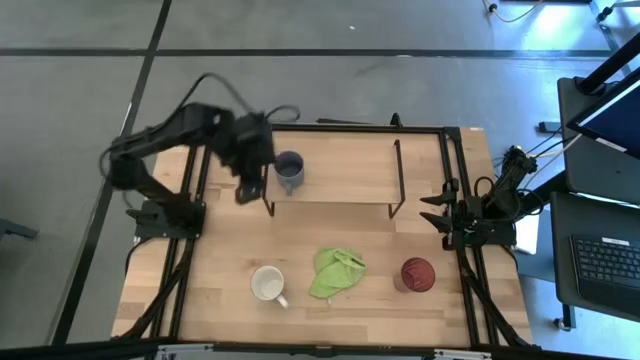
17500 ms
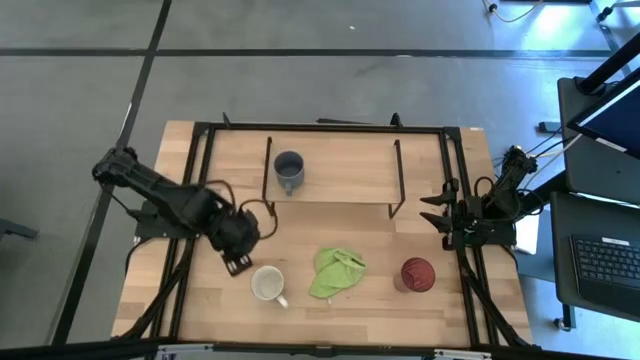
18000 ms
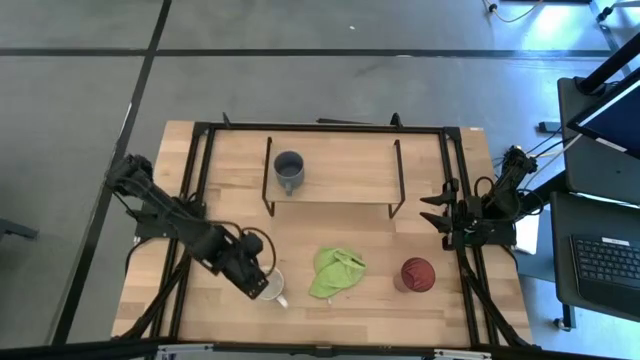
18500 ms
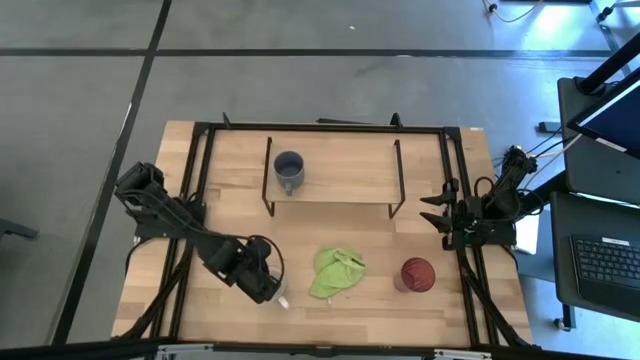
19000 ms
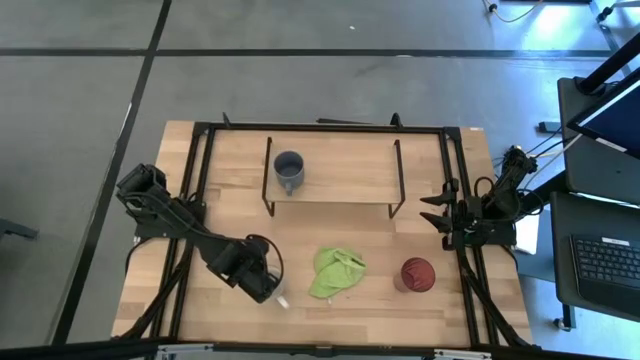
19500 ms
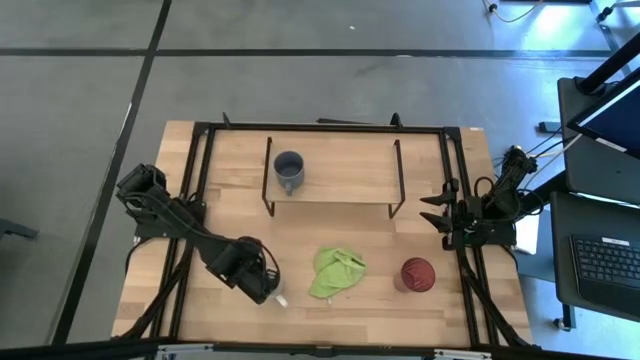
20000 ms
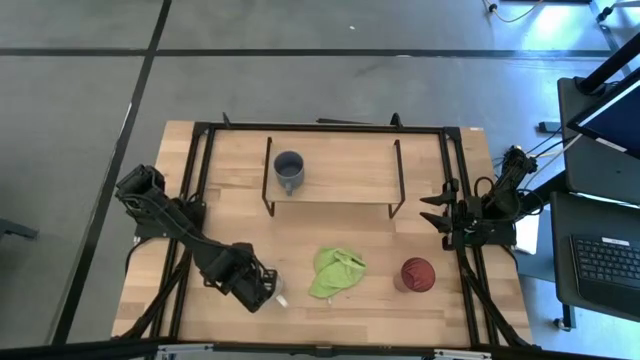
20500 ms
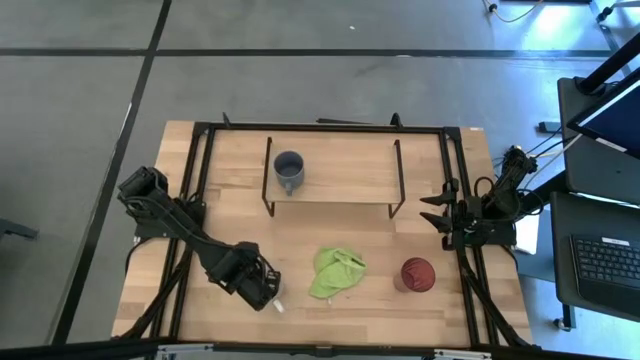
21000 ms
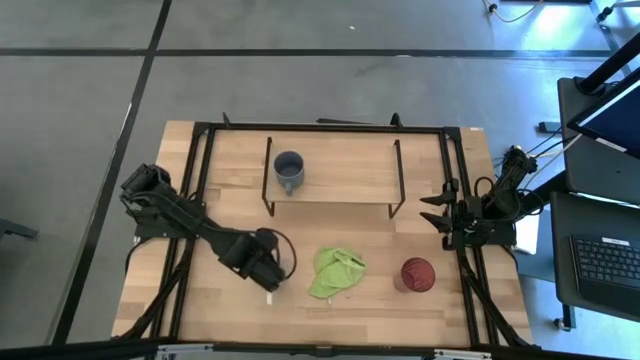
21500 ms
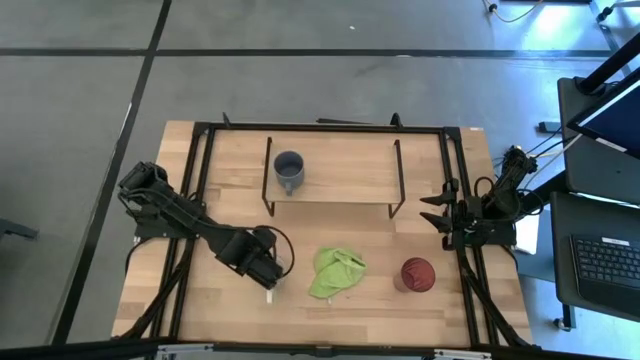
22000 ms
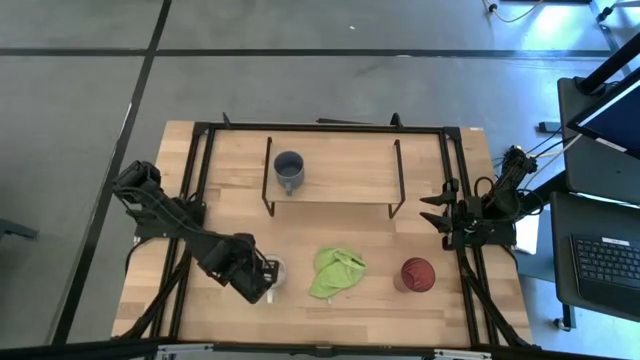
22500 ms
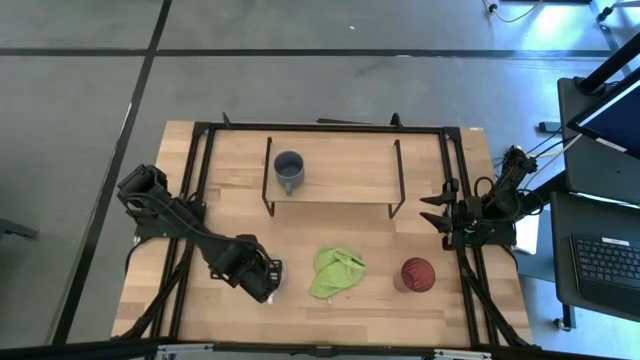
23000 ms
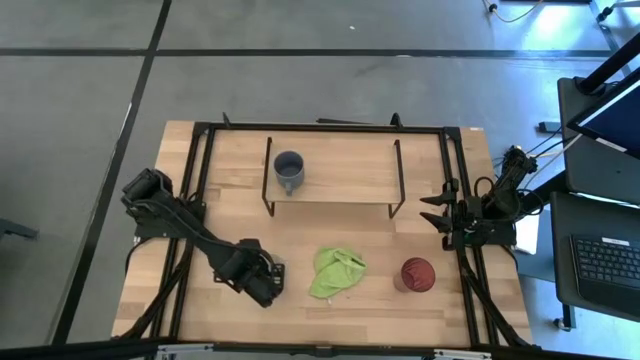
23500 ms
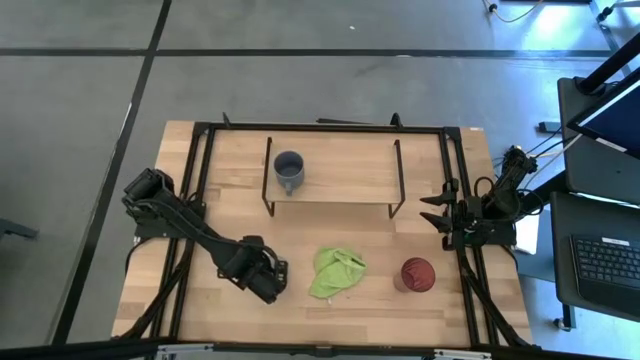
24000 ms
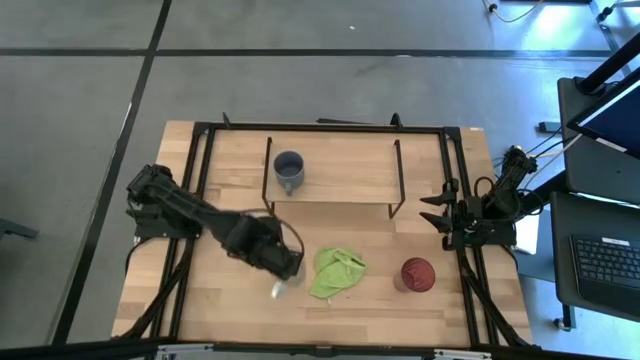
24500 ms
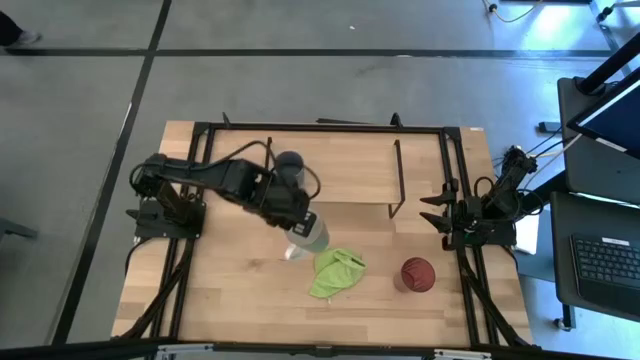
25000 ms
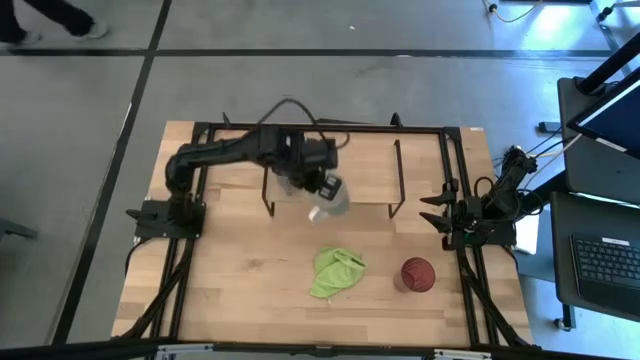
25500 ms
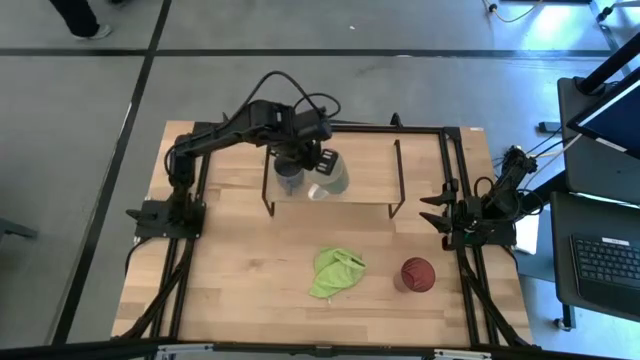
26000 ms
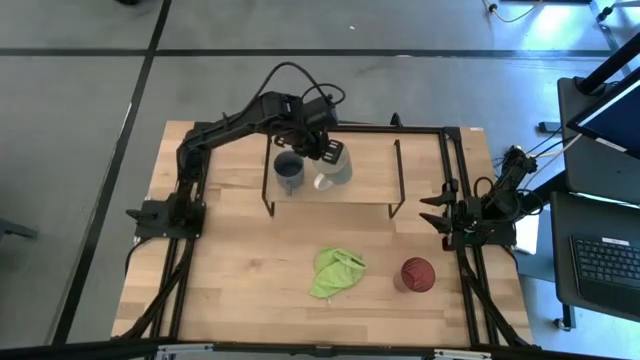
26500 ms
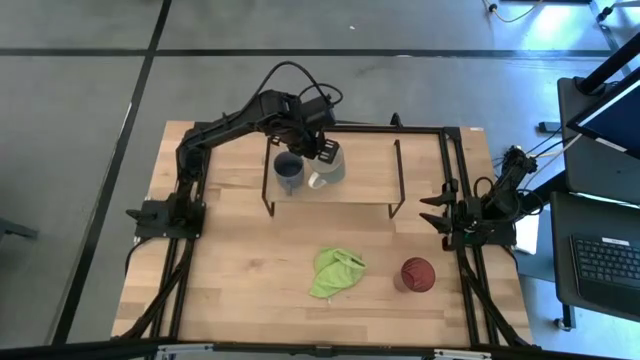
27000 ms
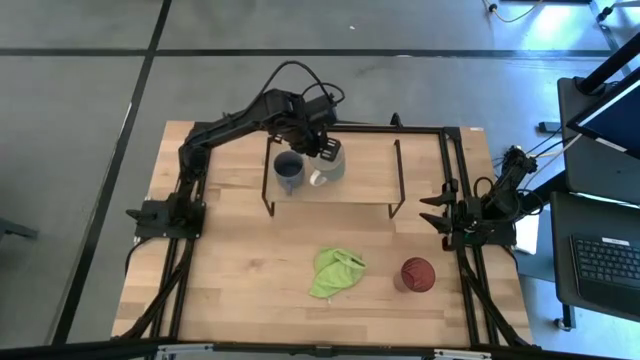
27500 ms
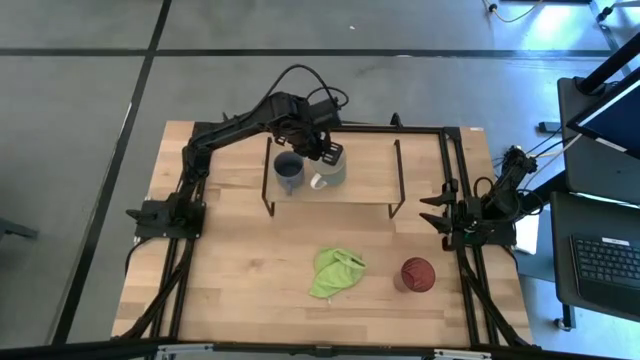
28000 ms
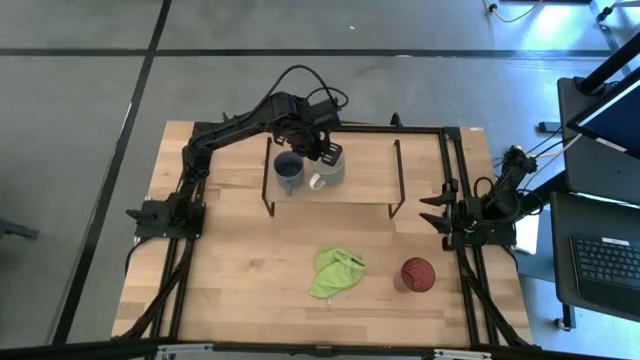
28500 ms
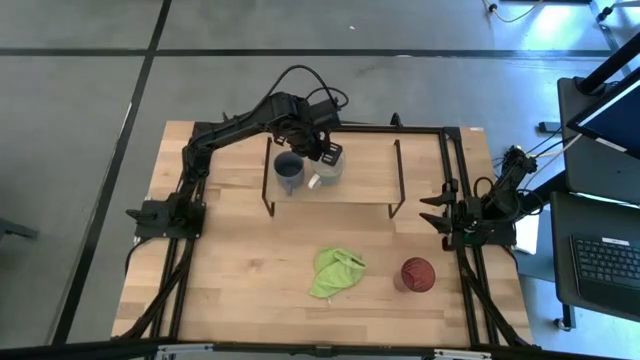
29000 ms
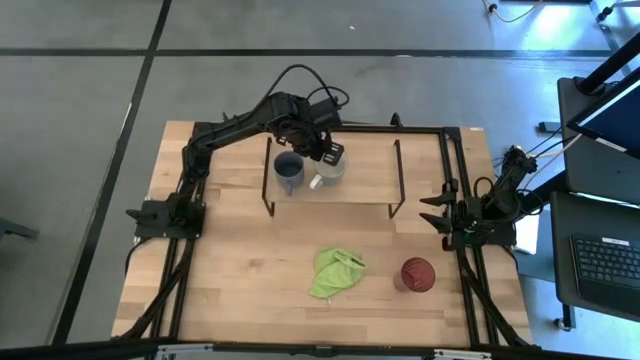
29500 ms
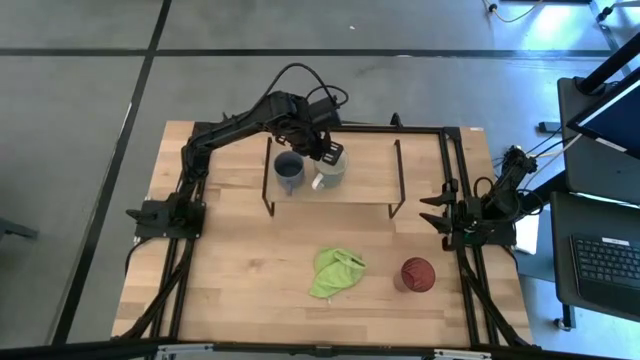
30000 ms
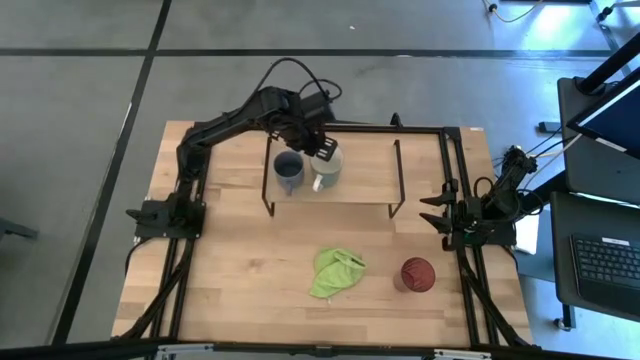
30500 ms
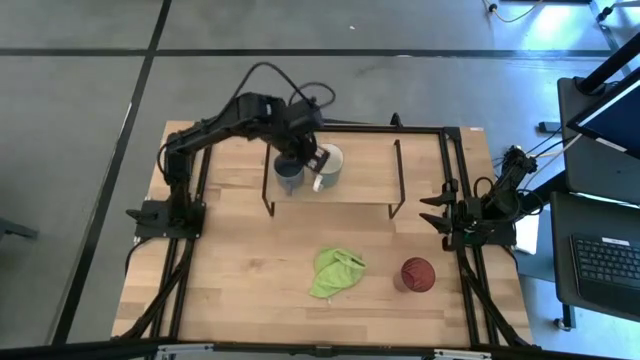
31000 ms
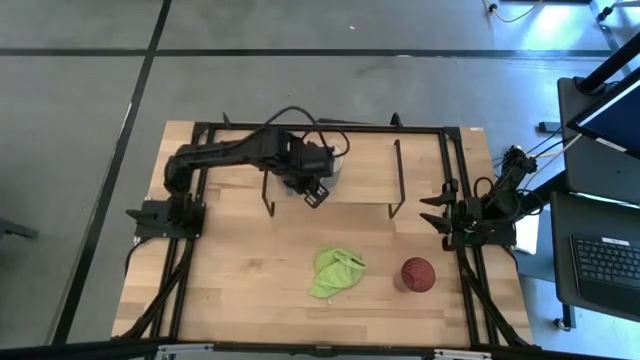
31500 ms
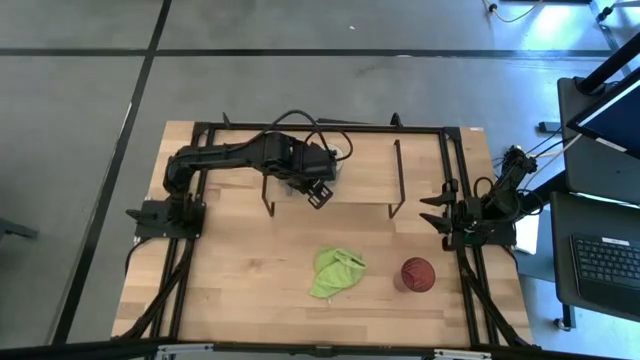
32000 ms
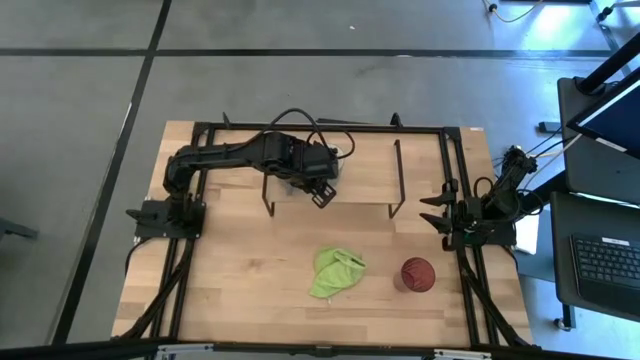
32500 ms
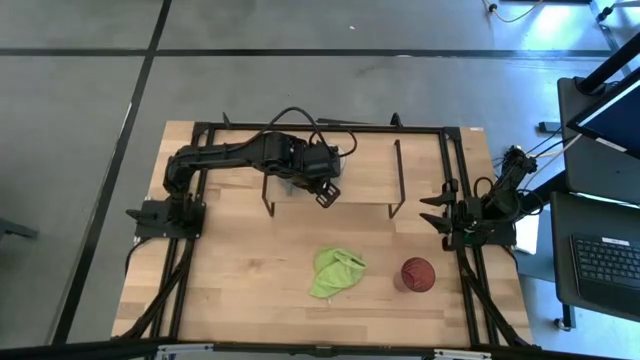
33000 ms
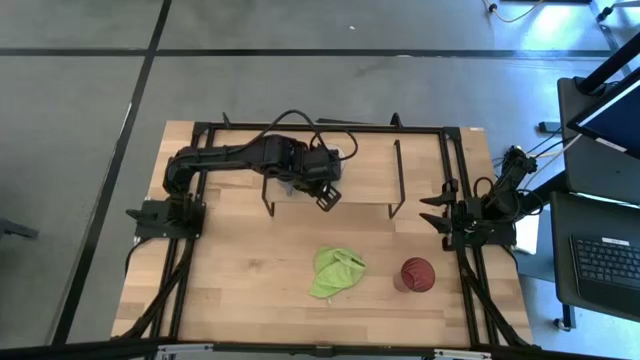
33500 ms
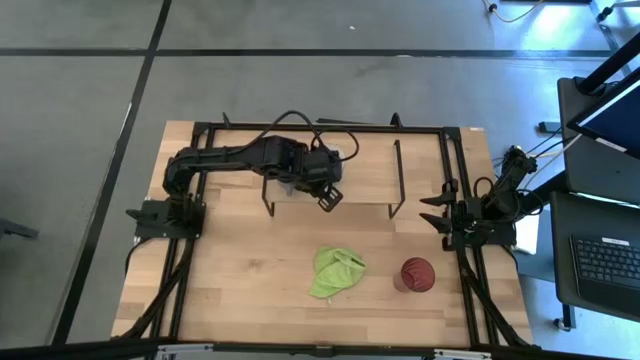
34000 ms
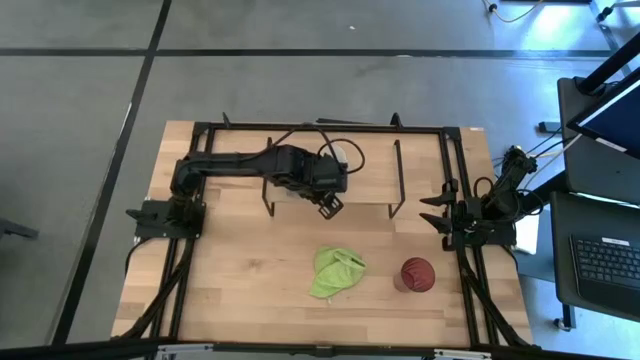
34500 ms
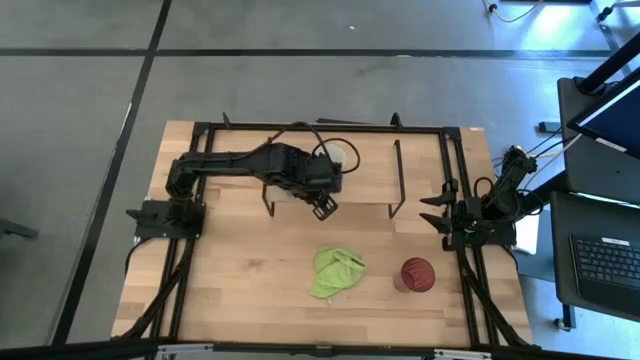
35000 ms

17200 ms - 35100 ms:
Task: Stack small to large cups/mugs on shelf
Put the light blue mug on the shelf

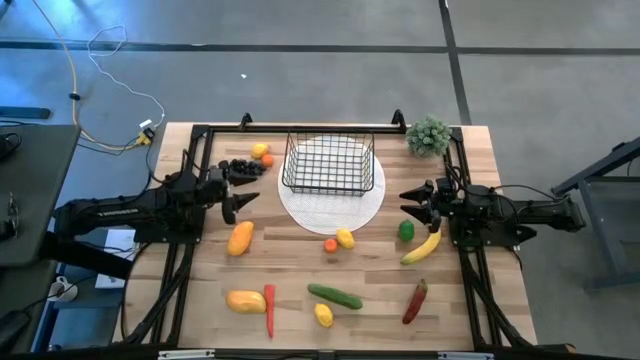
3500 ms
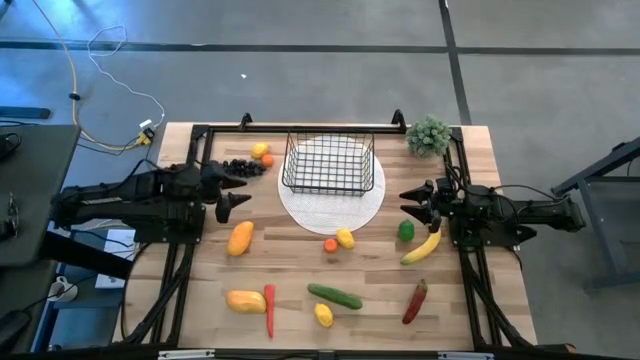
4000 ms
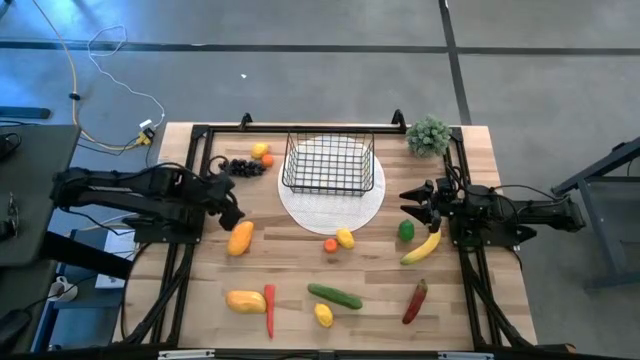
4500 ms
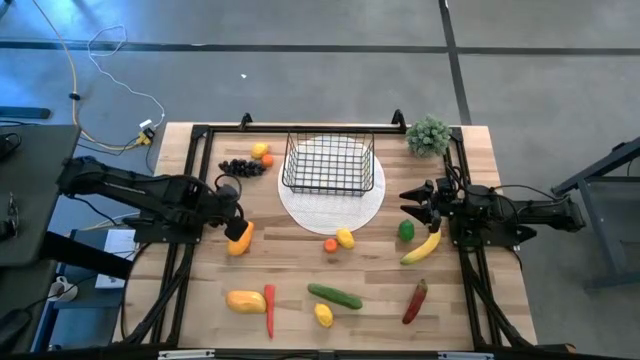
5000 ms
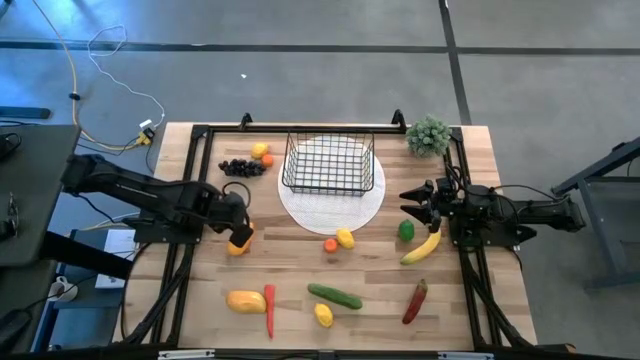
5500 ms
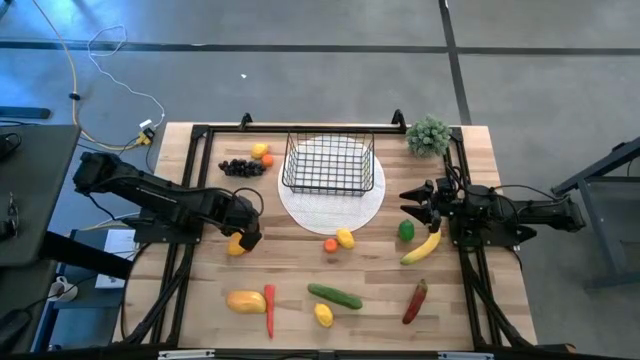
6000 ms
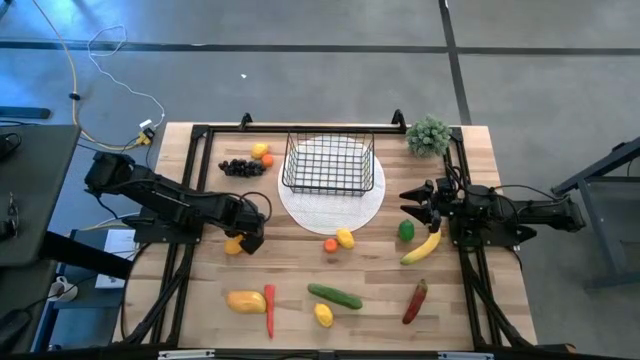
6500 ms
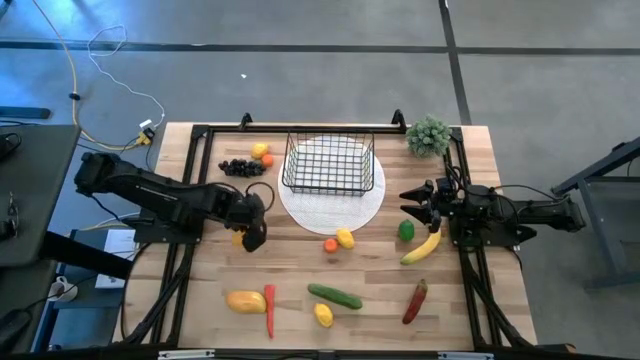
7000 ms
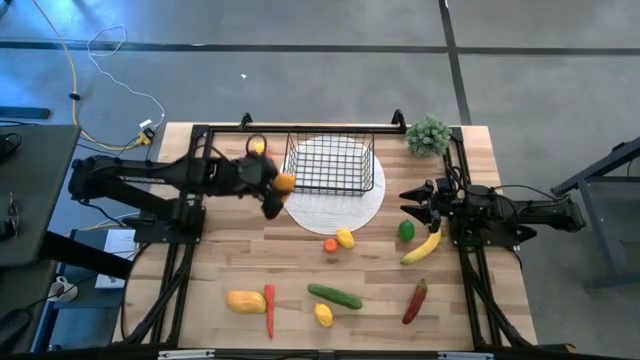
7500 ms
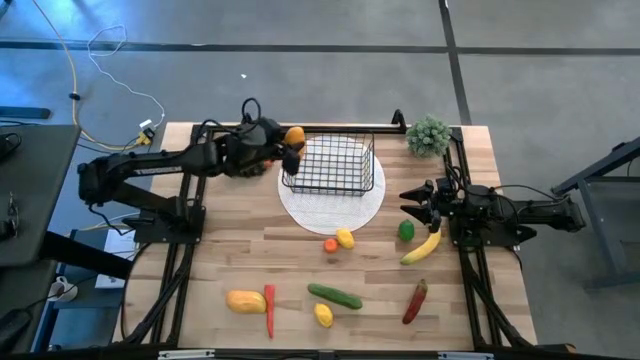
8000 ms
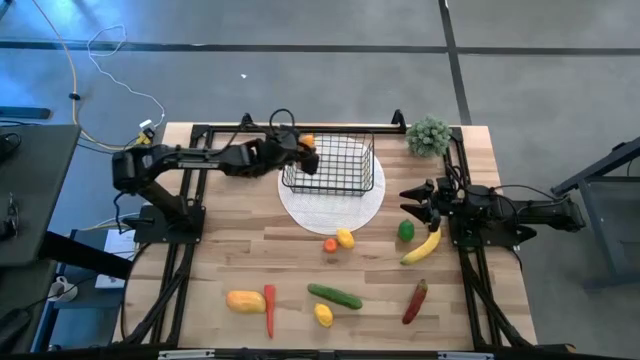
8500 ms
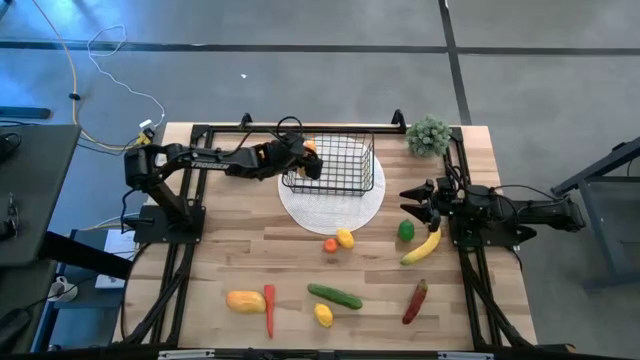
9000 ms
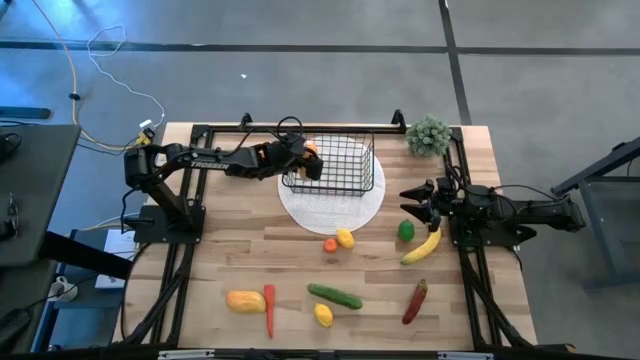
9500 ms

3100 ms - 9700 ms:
Task: Build produce basket
Put the top yellow mango into the wire basket
